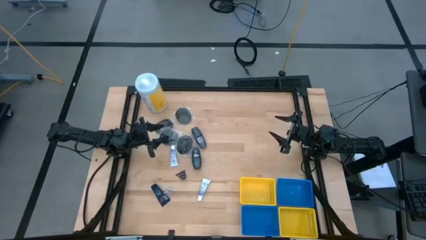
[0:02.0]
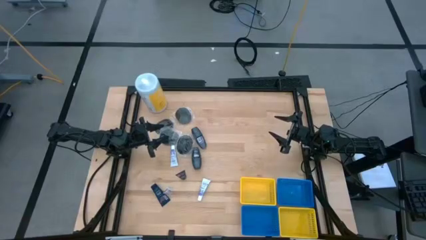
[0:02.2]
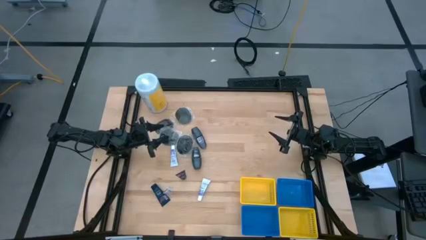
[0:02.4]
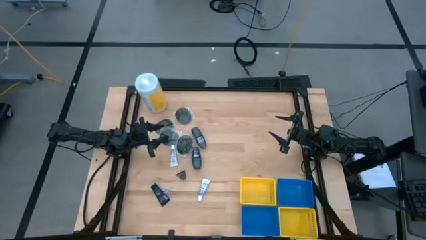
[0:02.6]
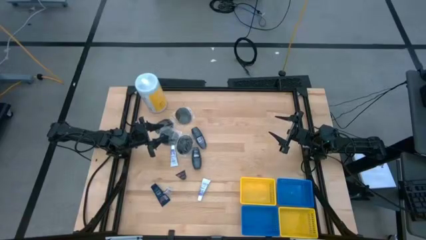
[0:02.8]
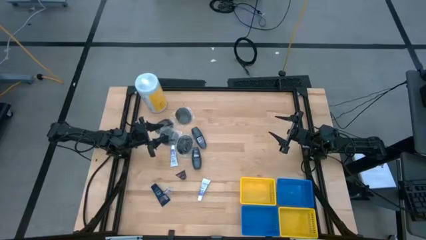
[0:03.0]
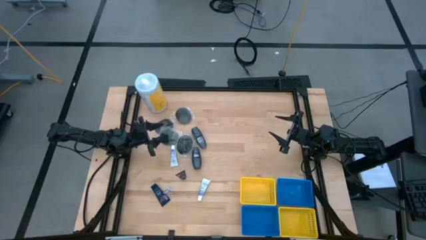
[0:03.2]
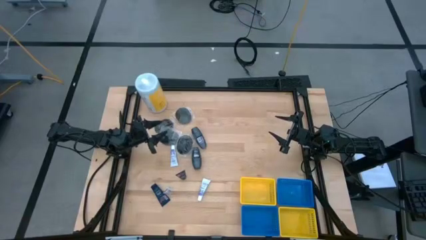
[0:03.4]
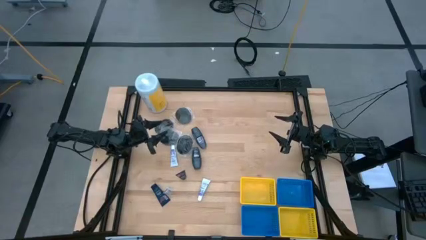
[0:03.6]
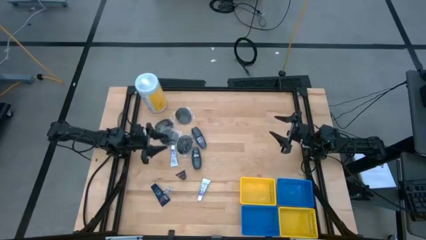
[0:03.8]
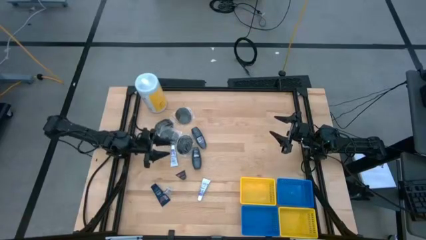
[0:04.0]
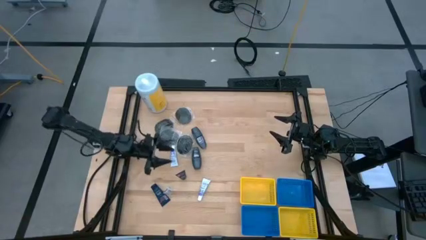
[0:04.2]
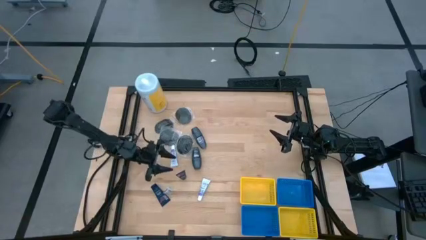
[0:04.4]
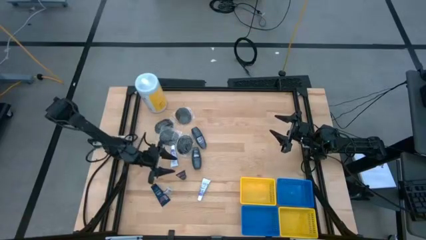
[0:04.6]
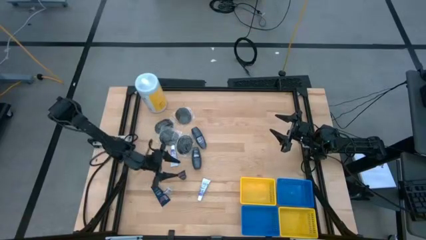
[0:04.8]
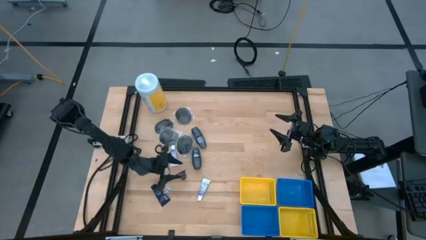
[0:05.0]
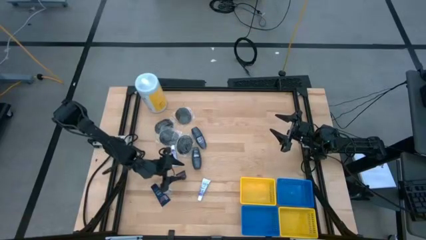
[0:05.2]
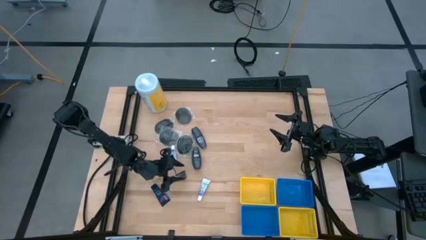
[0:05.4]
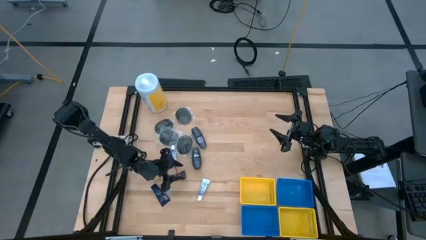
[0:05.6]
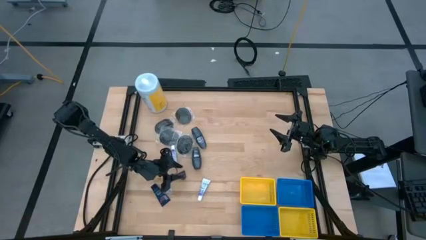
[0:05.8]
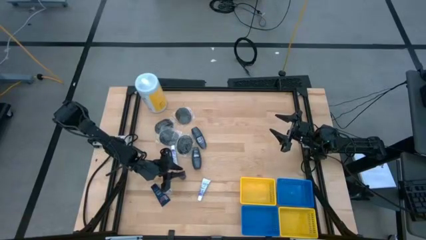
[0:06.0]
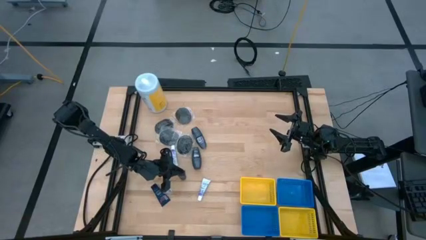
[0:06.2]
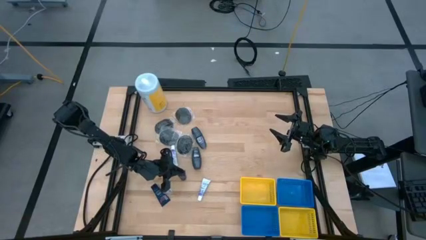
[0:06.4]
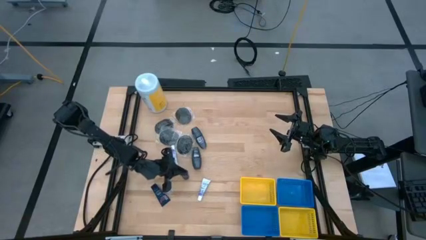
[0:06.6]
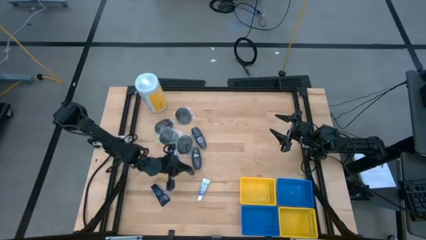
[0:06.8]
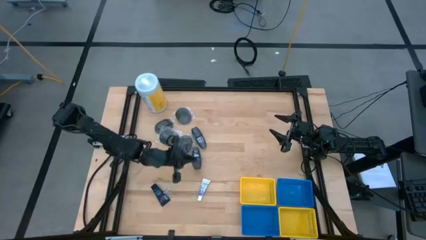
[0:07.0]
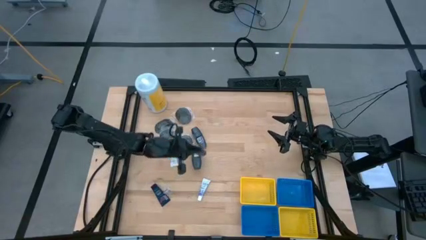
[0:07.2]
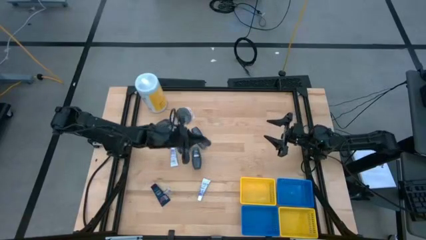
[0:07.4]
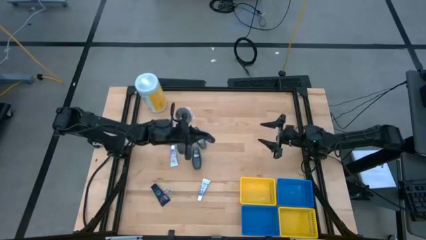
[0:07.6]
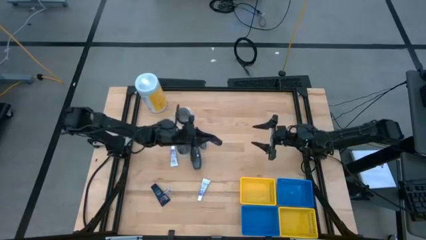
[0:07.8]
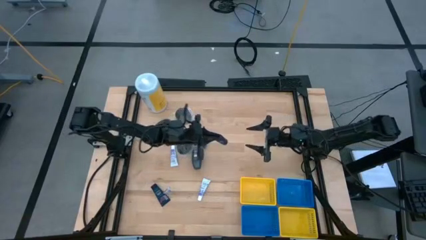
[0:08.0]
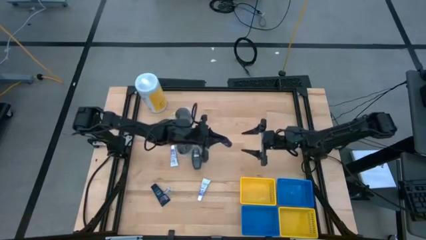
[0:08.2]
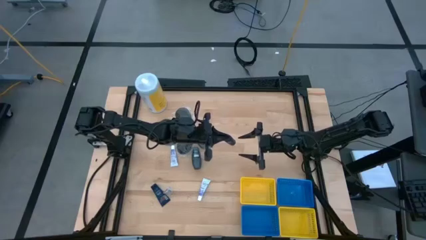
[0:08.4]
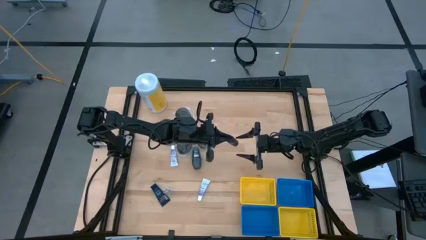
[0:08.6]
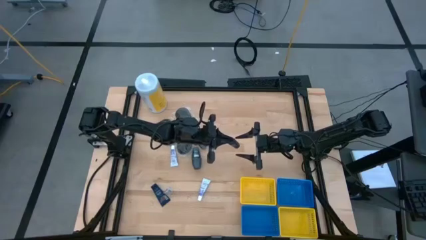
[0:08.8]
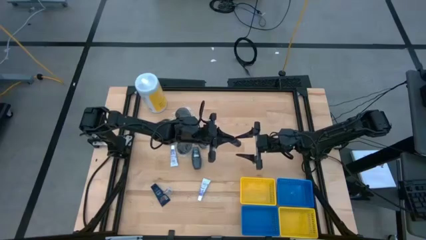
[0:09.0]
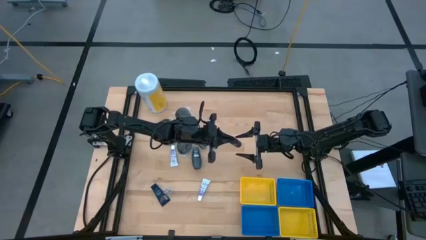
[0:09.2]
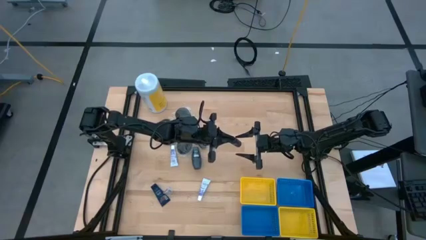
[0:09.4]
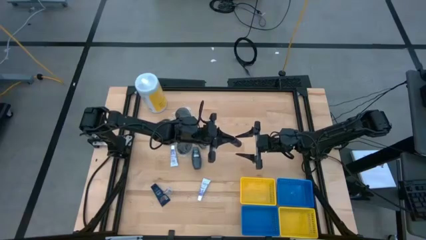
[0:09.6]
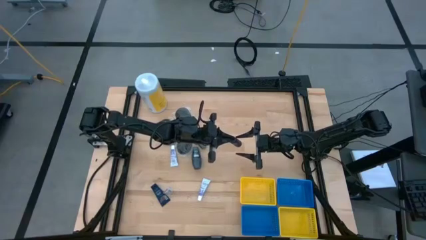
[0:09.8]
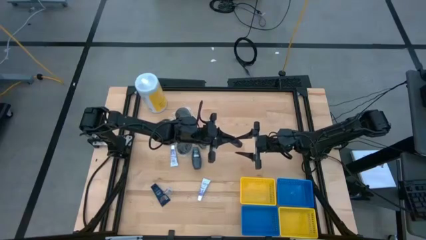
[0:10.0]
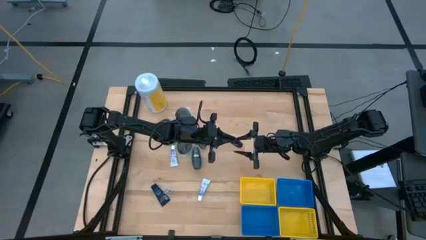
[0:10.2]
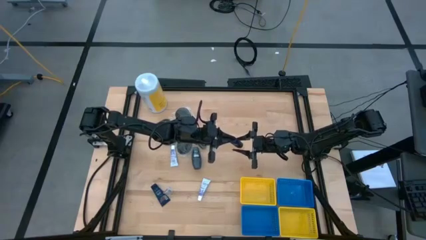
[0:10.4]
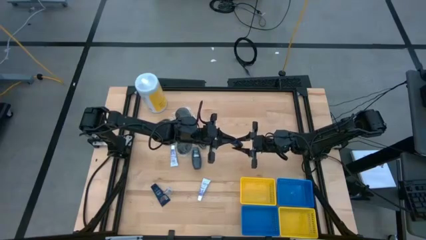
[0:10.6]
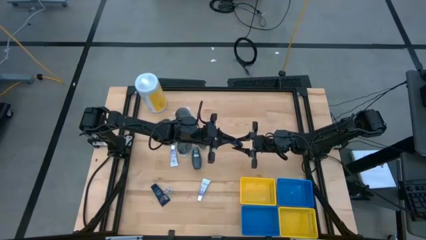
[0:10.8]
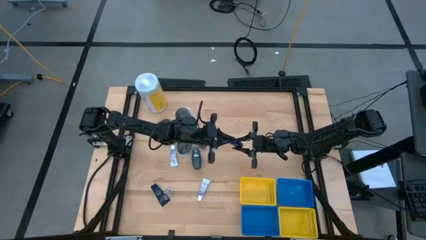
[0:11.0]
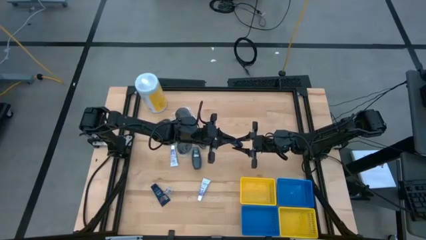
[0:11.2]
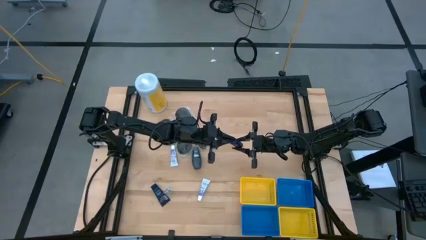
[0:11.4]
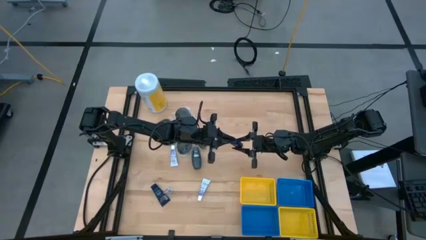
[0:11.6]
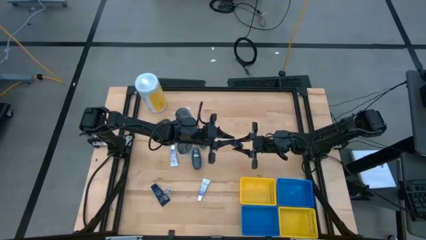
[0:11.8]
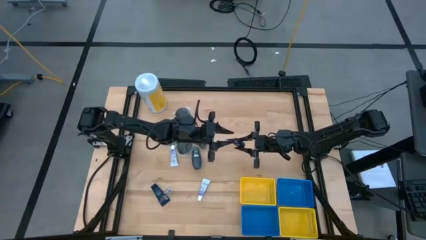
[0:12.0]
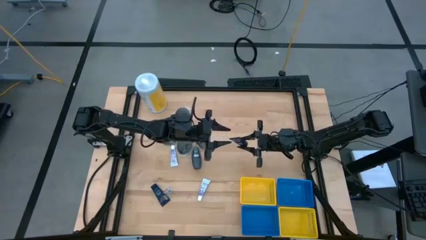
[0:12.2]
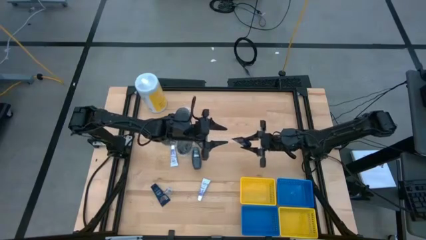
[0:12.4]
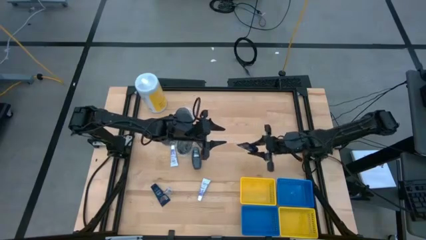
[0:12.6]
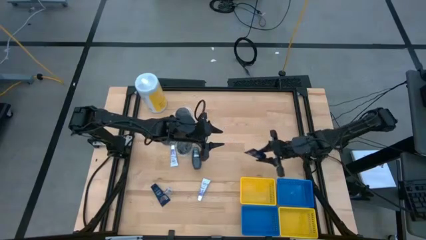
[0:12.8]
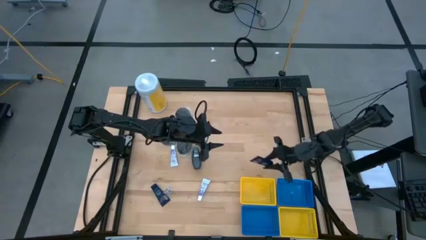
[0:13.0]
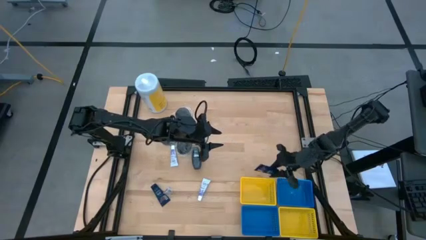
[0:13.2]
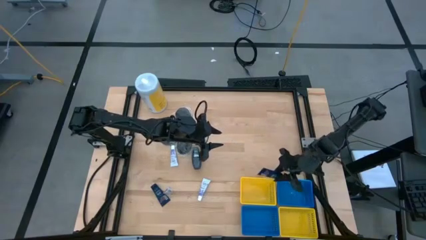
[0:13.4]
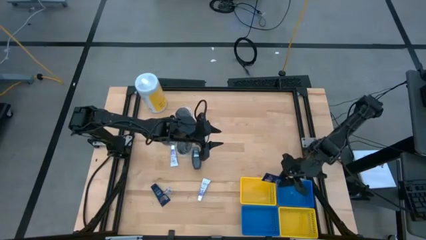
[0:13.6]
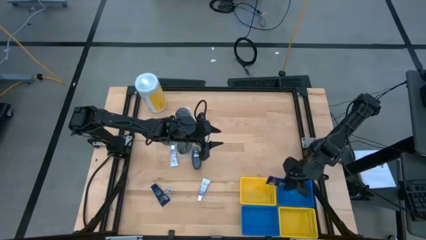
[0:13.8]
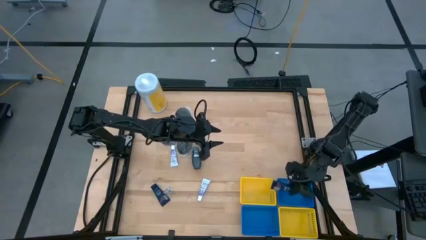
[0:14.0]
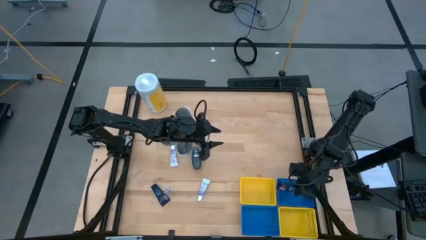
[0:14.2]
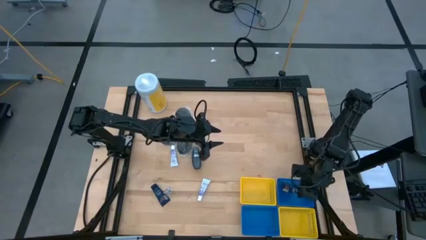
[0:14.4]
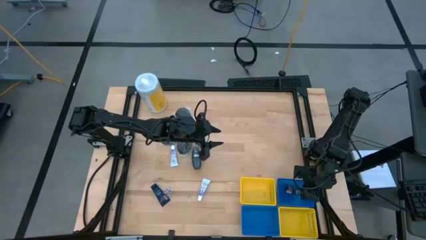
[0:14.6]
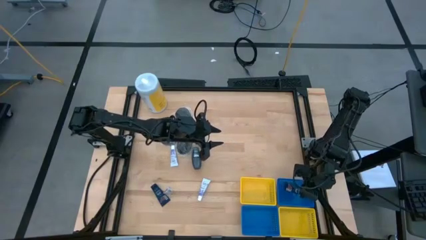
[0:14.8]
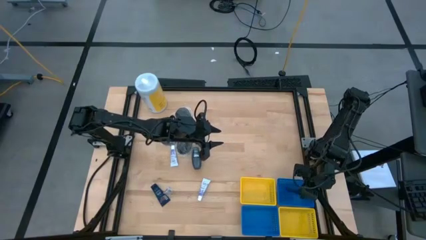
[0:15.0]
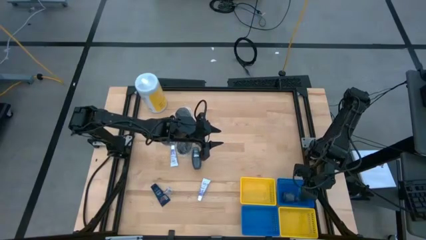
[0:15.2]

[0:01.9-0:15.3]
Task: Pick & Place Travel size toiletries
Put the black shave cream into the top blue bin
